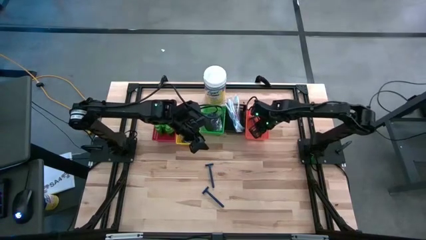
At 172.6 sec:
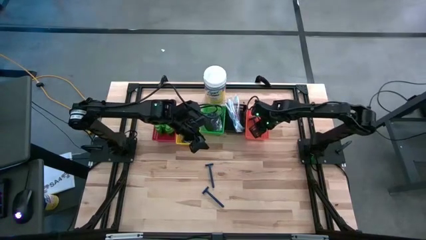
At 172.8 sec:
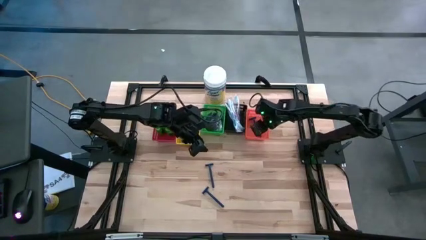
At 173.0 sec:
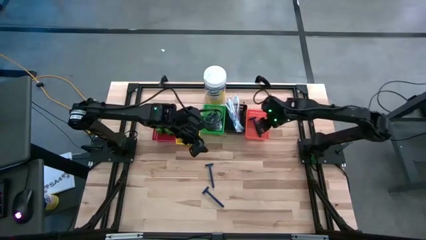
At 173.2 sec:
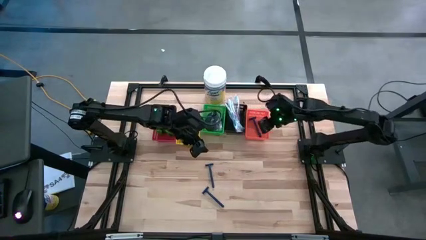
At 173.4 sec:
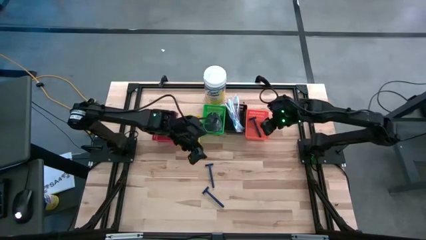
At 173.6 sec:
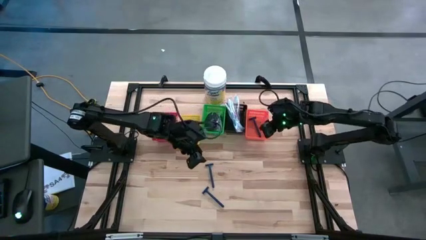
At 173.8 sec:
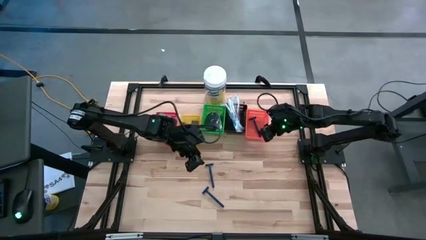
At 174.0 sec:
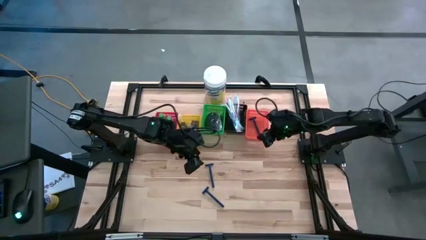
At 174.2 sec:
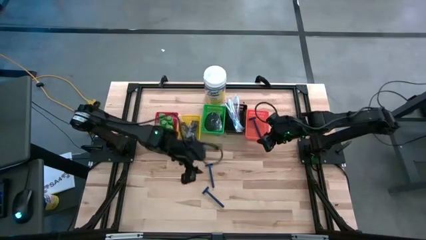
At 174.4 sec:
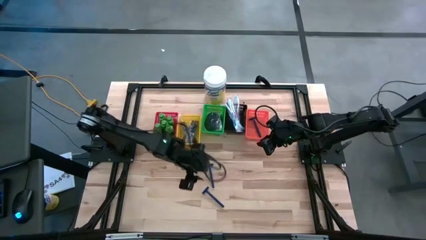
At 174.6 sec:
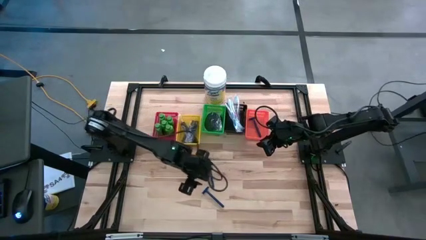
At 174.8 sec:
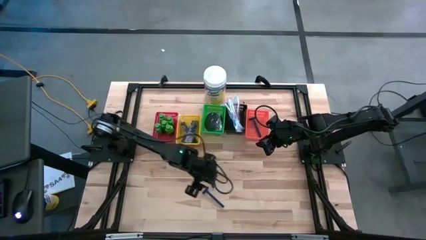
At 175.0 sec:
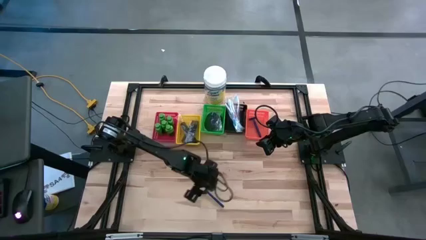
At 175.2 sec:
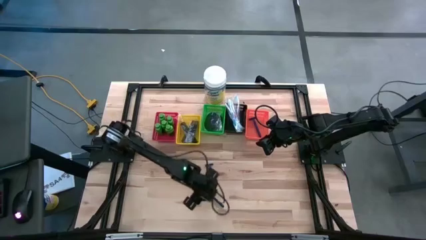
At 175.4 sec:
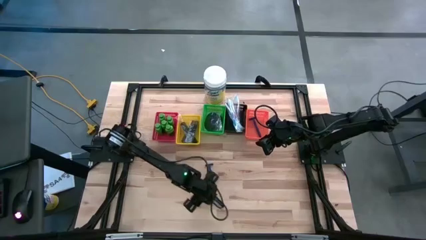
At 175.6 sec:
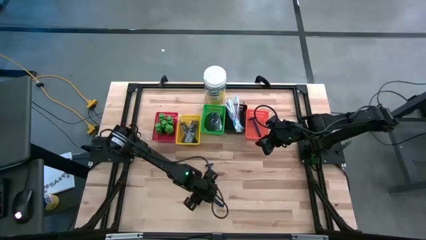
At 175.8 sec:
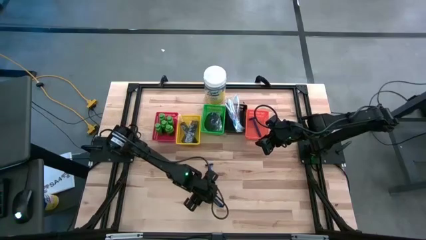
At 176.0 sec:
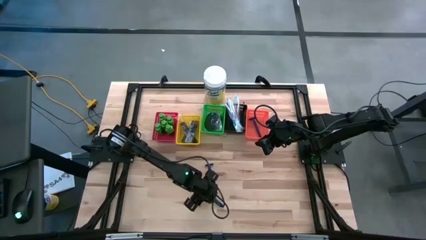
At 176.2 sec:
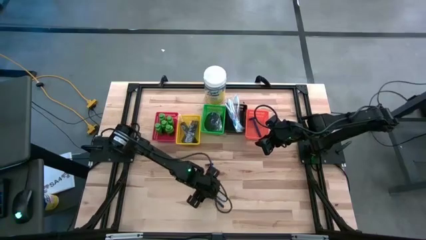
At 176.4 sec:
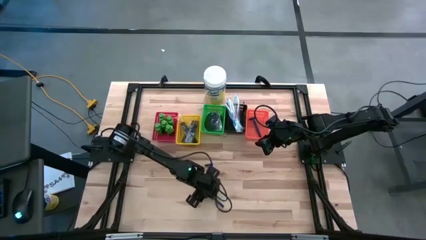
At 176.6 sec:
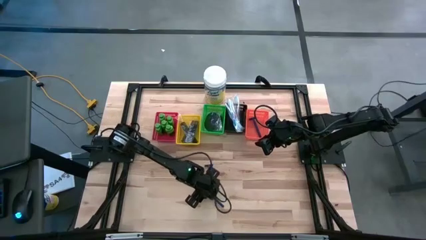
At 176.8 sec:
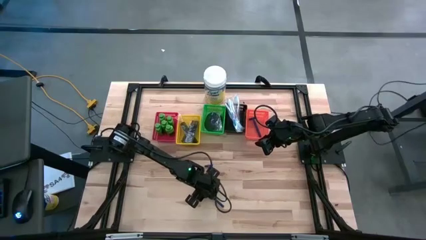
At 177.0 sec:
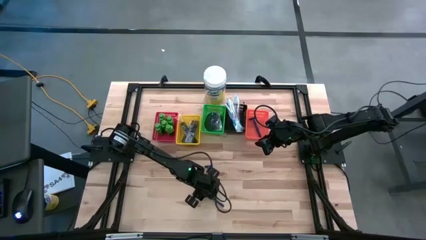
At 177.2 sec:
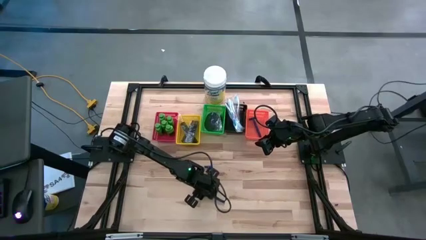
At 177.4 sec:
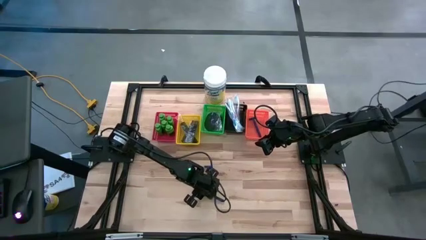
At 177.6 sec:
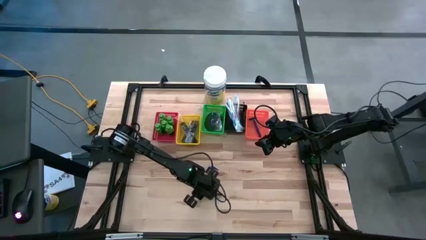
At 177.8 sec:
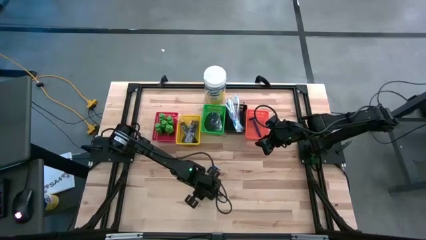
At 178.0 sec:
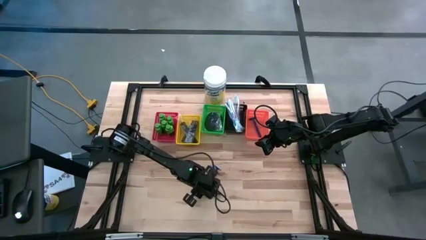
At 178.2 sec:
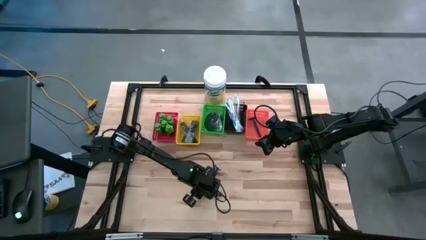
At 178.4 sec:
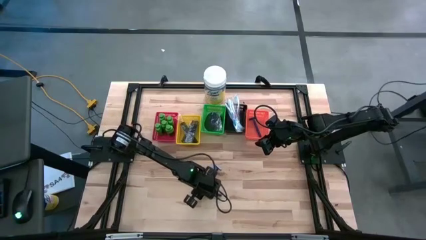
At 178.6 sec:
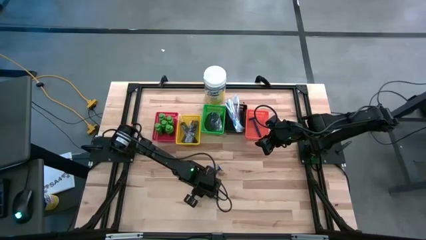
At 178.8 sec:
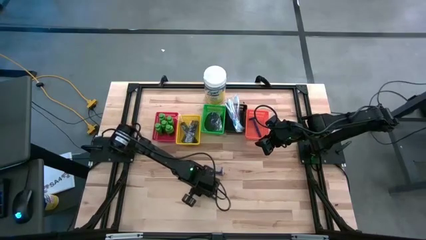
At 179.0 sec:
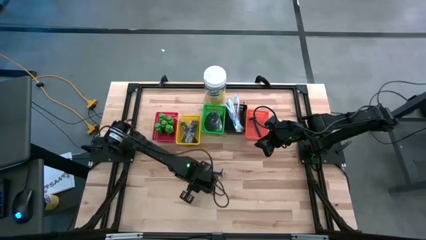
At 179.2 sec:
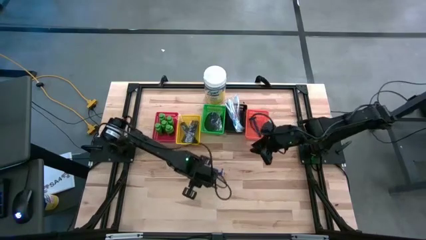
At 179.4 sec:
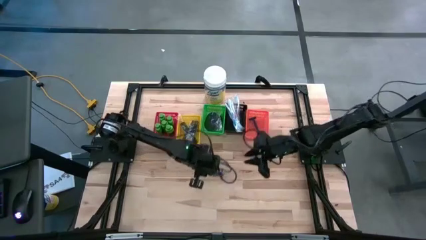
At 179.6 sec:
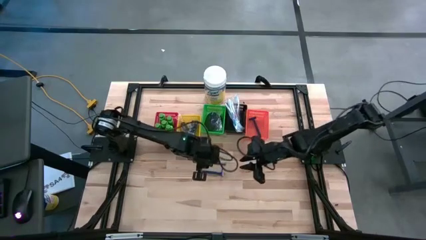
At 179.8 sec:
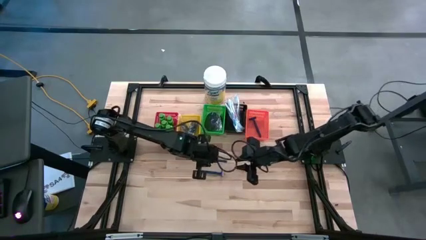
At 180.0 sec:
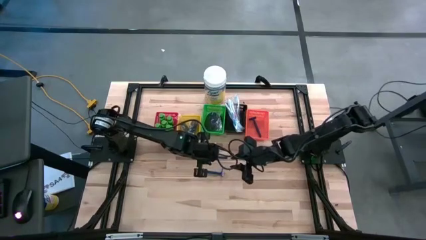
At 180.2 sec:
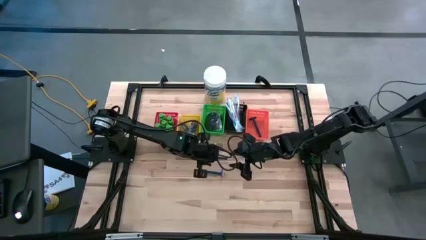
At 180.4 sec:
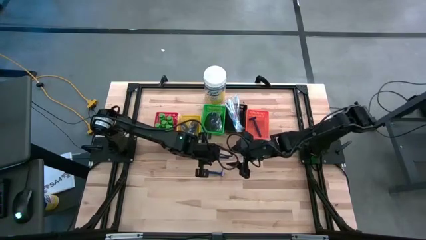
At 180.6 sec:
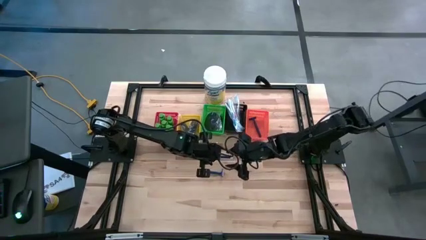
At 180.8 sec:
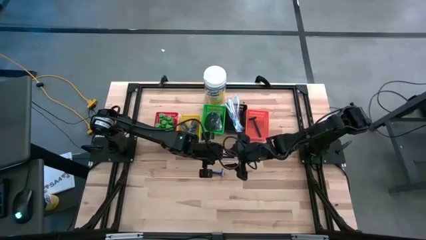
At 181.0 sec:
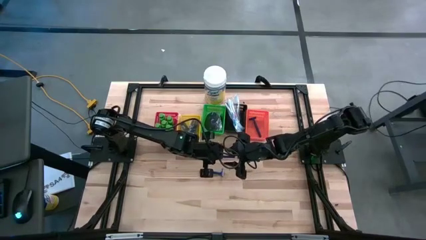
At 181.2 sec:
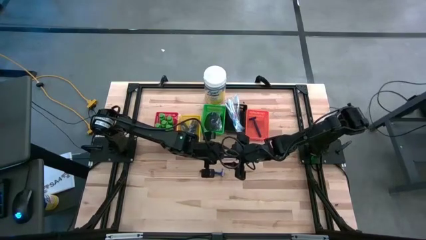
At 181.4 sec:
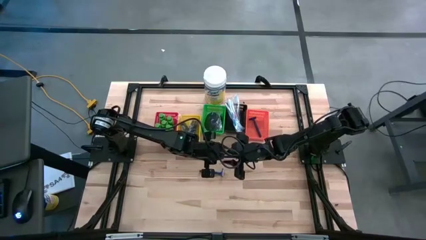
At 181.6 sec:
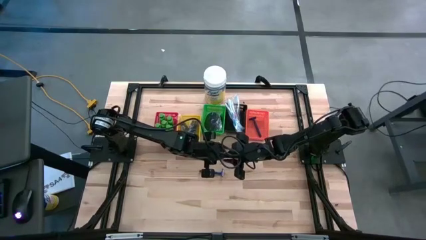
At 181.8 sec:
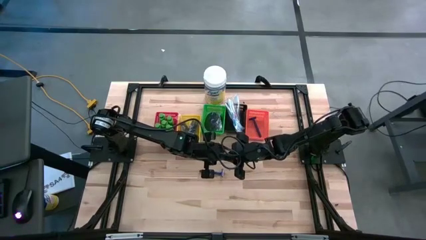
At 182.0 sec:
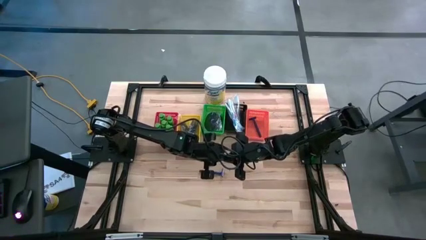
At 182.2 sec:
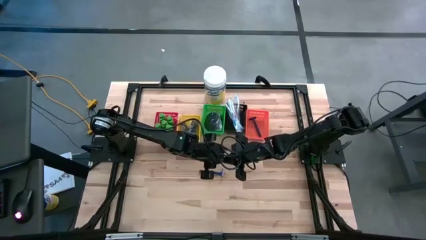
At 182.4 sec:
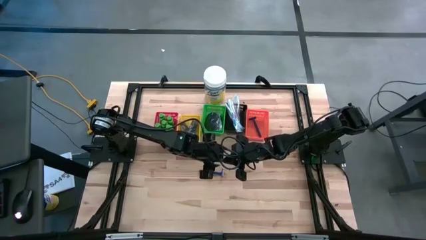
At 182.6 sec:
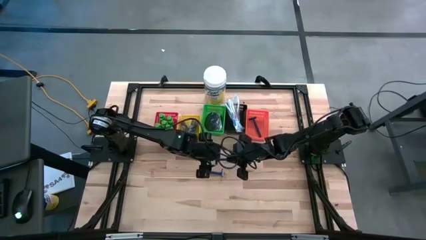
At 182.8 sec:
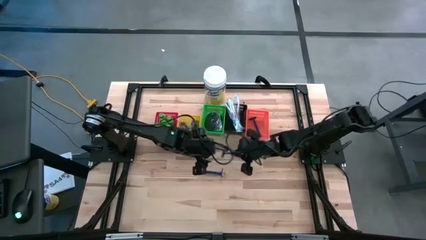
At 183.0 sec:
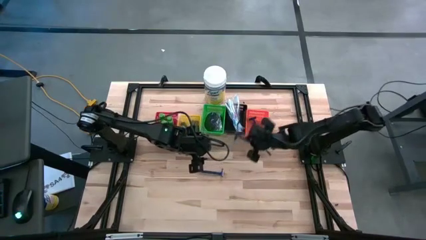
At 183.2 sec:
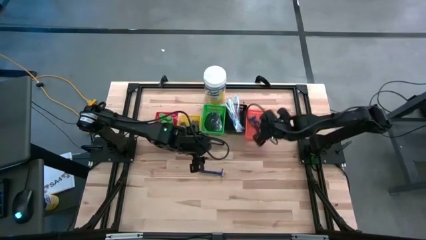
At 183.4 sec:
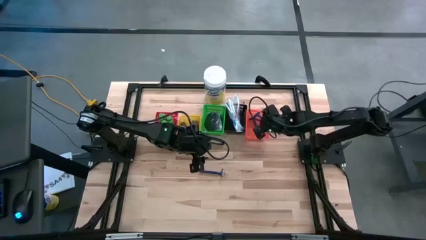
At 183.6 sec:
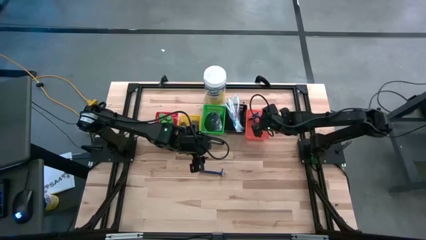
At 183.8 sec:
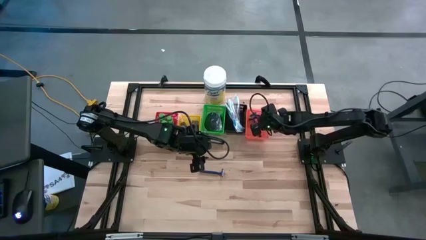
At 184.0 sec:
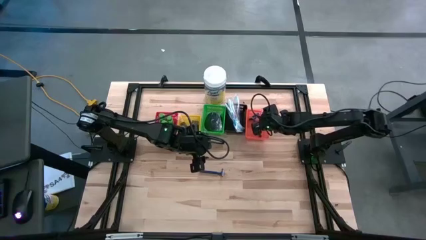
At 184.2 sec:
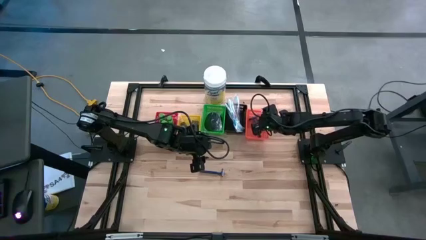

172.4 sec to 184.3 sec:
Task: Pick & Place Travel size toiletries
Put the blue razor into the orange bin

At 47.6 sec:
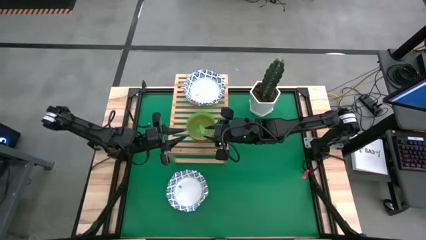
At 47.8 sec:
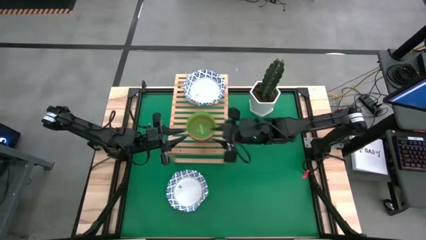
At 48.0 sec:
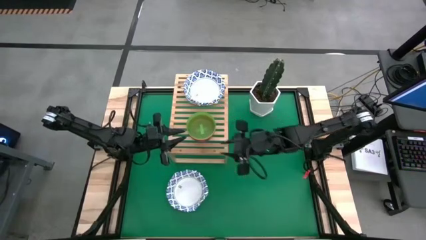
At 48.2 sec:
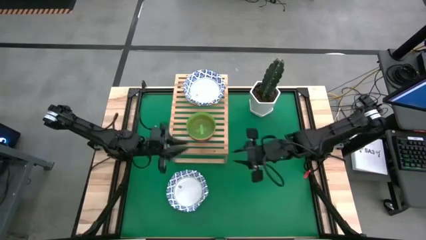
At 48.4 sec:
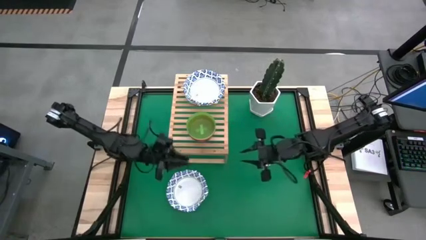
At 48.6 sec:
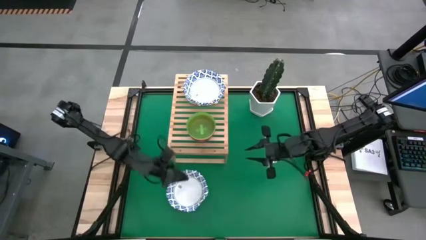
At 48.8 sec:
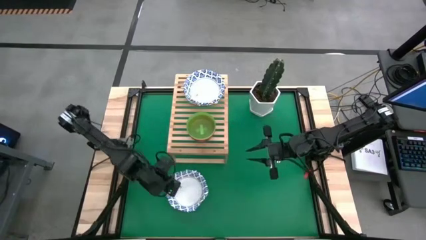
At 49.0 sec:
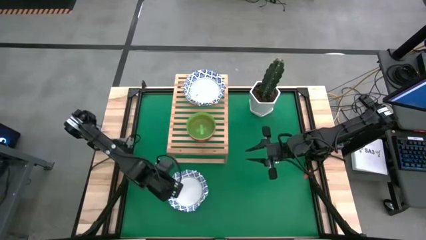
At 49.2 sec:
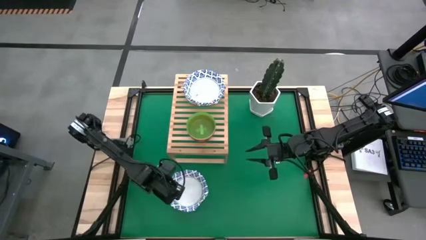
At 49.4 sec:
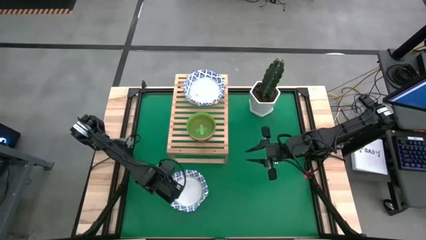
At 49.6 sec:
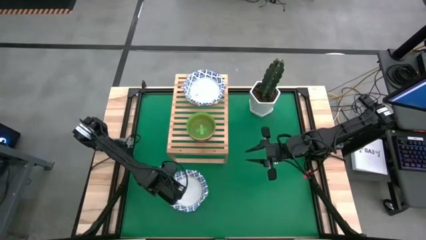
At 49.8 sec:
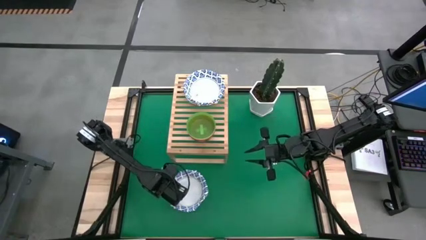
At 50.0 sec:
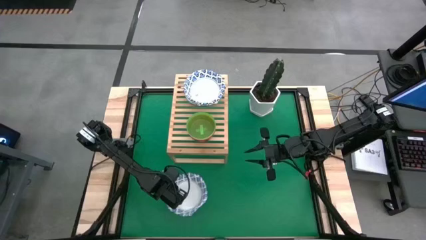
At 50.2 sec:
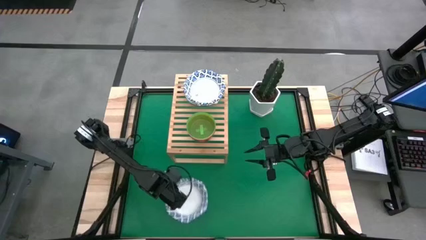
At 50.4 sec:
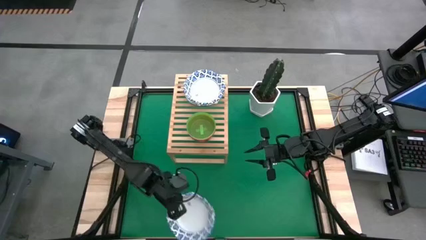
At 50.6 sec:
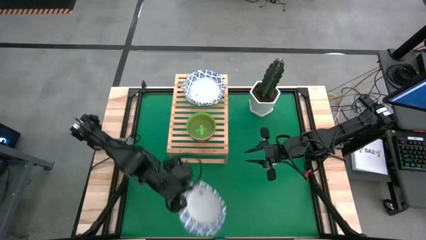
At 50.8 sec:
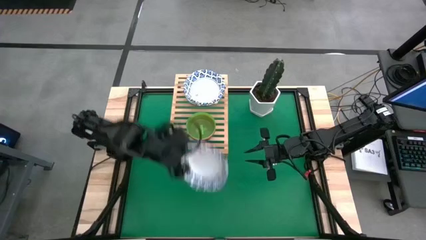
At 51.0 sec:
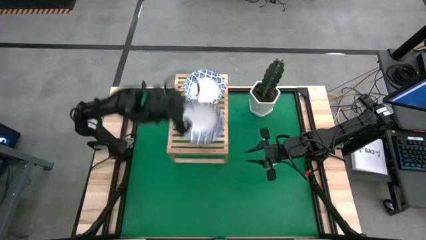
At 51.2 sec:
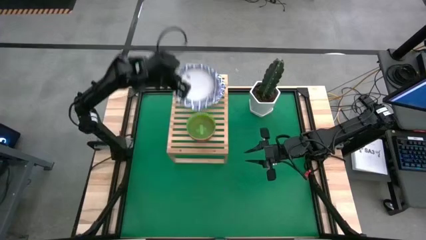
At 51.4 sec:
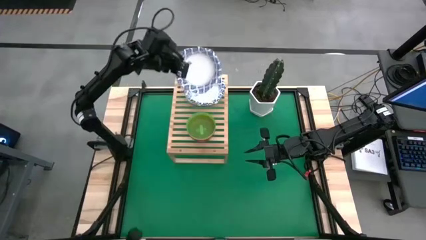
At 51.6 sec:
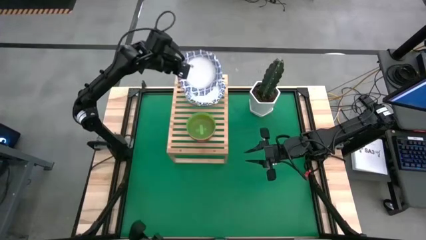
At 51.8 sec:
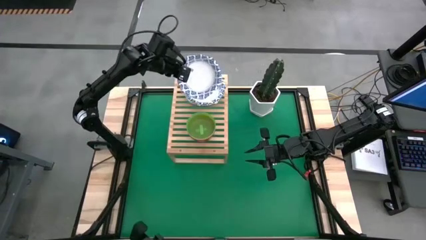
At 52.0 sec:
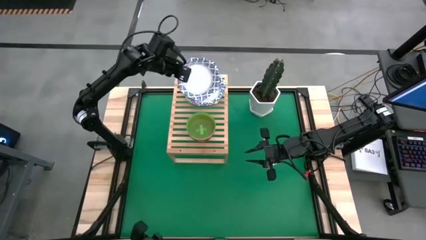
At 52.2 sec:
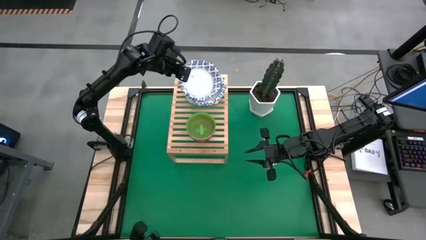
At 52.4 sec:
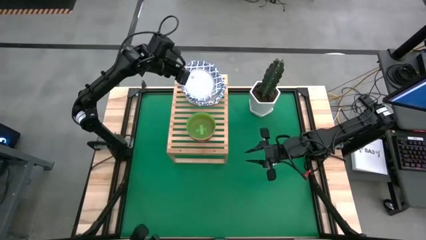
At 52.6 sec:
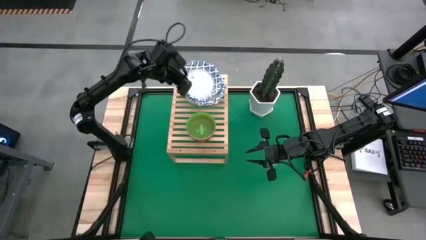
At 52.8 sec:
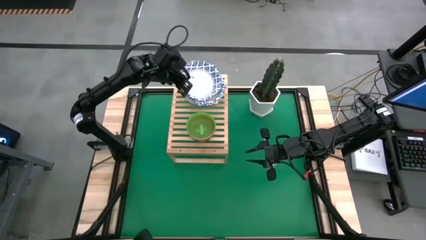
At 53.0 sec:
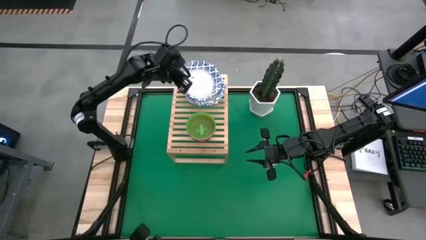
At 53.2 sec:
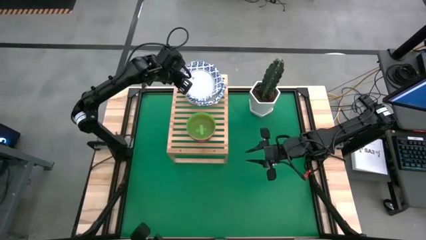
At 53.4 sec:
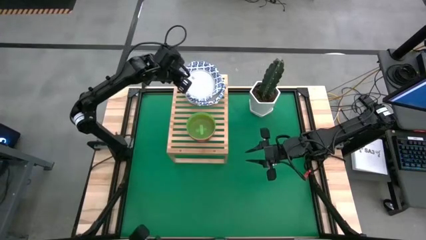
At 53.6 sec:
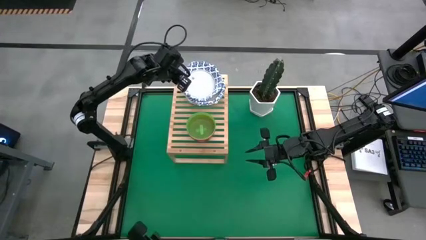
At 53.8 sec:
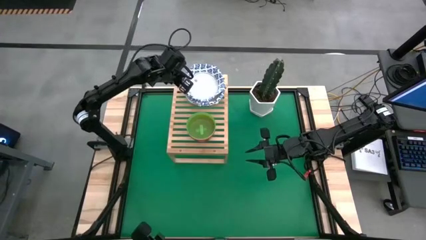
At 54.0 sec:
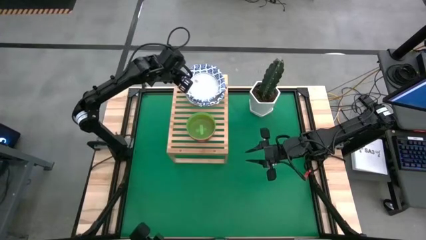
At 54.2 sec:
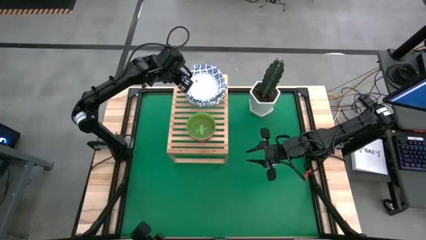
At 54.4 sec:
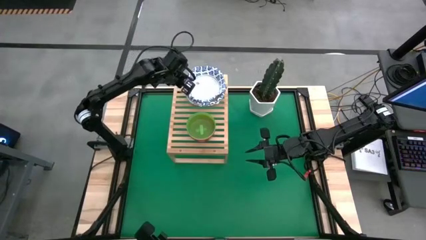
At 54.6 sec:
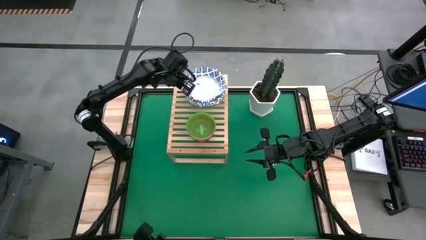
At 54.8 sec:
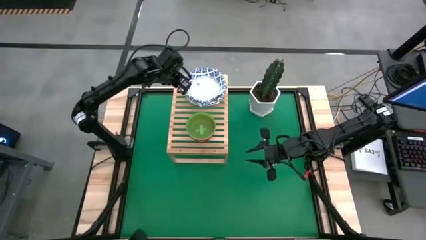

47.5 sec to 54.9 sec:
Task: Place and stack bowls onto a shelf
Stack the white and blue bowl on top with the other white and blue bowl on the shelf
